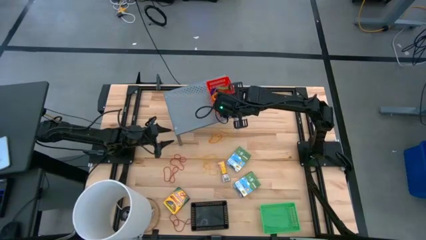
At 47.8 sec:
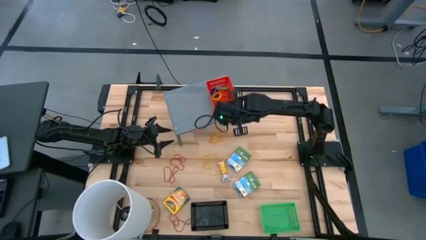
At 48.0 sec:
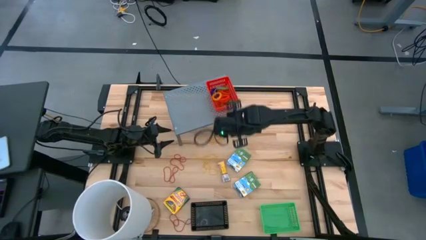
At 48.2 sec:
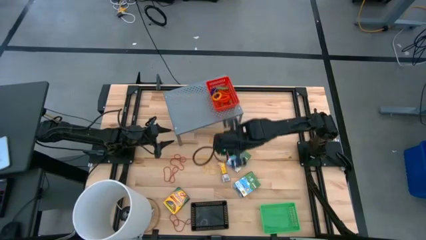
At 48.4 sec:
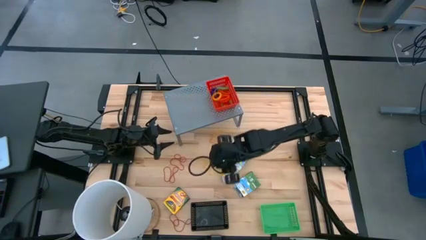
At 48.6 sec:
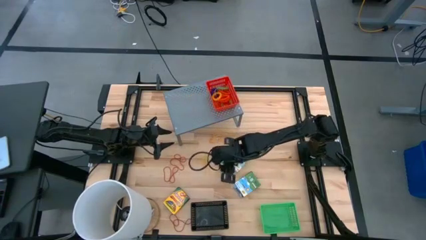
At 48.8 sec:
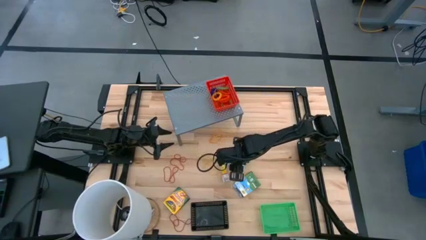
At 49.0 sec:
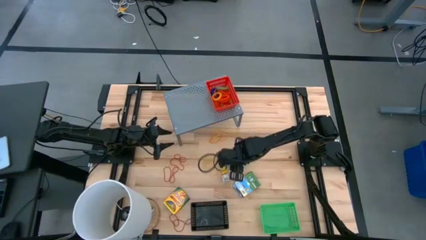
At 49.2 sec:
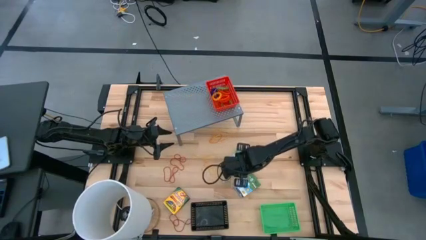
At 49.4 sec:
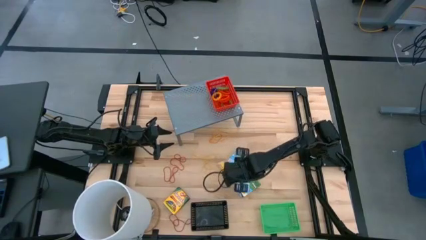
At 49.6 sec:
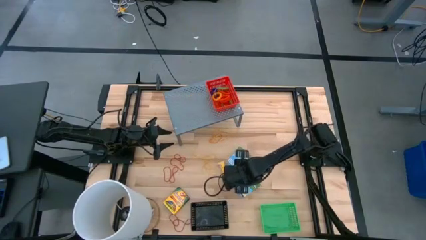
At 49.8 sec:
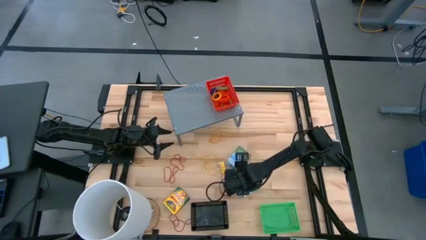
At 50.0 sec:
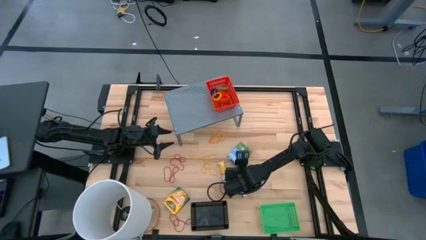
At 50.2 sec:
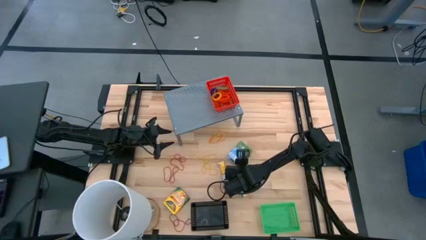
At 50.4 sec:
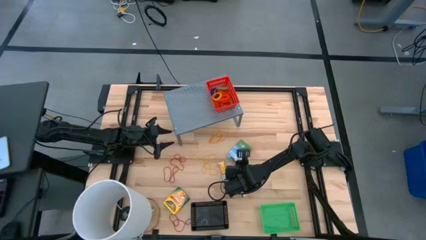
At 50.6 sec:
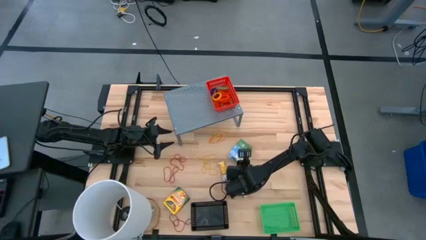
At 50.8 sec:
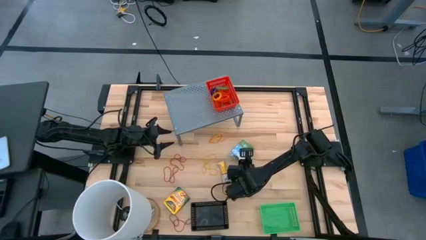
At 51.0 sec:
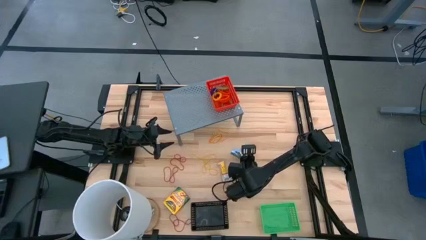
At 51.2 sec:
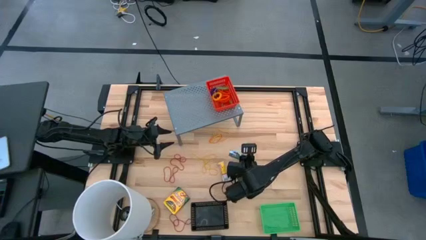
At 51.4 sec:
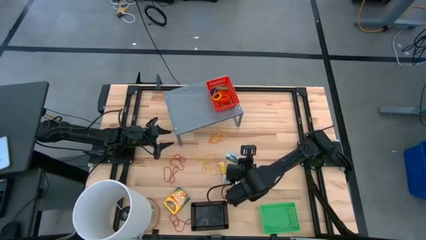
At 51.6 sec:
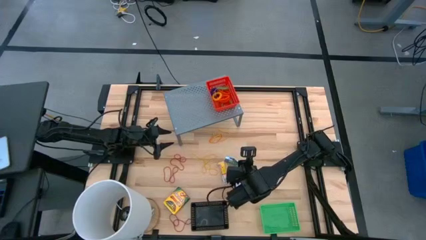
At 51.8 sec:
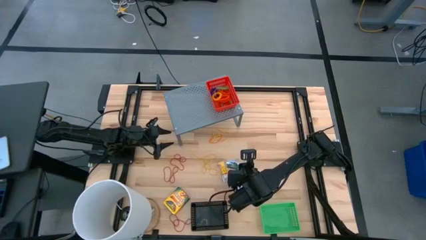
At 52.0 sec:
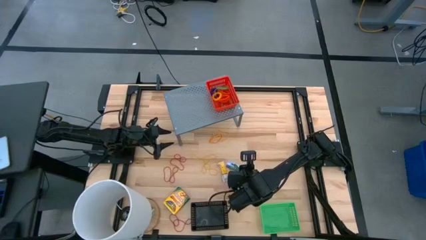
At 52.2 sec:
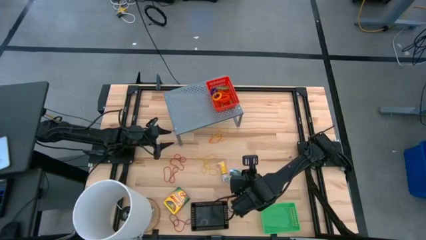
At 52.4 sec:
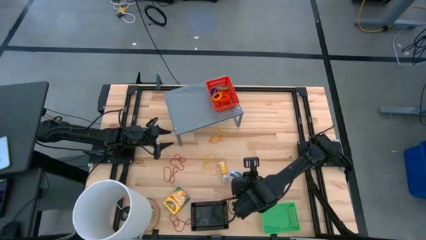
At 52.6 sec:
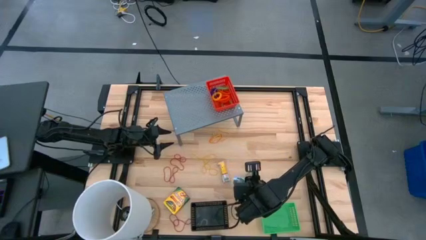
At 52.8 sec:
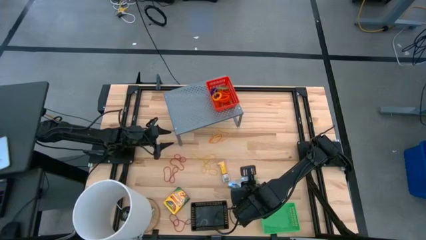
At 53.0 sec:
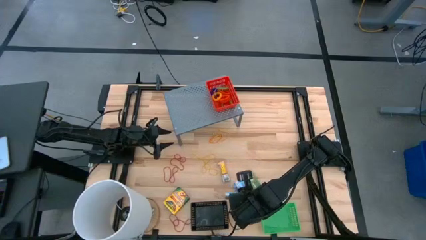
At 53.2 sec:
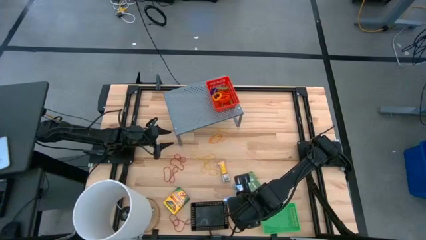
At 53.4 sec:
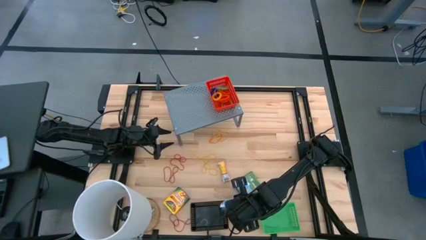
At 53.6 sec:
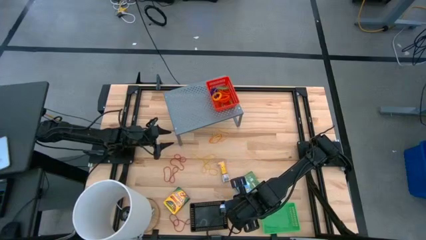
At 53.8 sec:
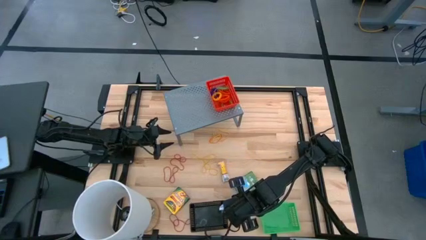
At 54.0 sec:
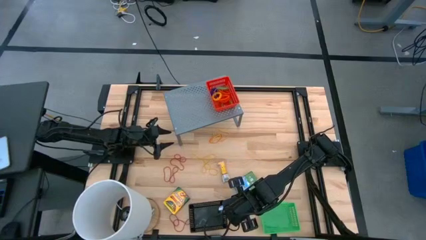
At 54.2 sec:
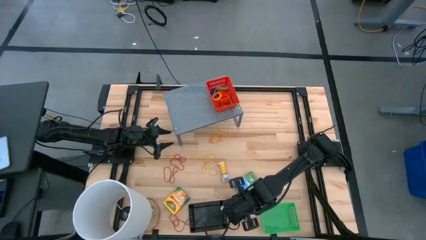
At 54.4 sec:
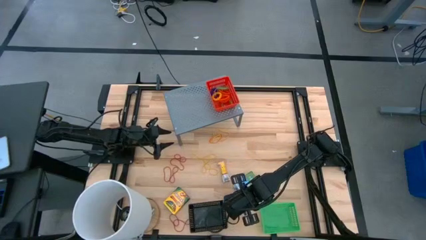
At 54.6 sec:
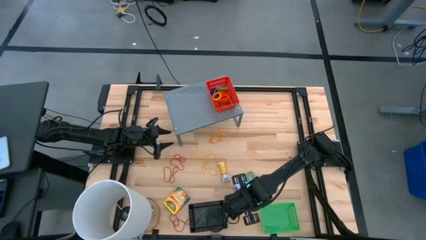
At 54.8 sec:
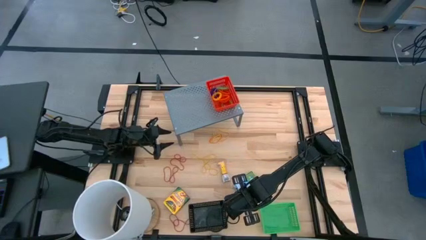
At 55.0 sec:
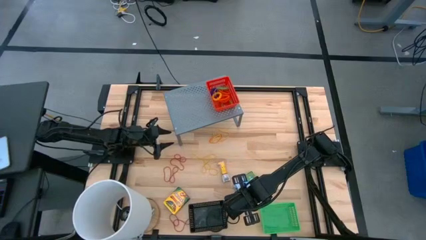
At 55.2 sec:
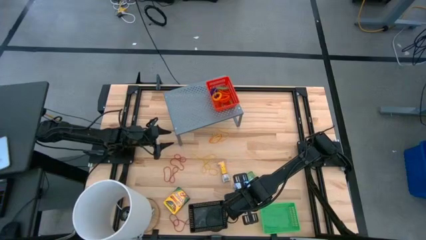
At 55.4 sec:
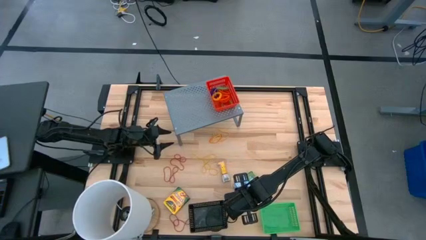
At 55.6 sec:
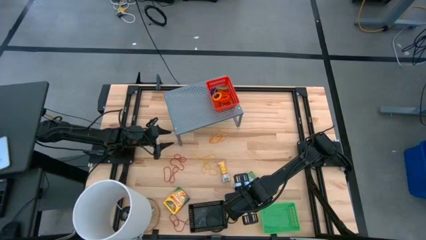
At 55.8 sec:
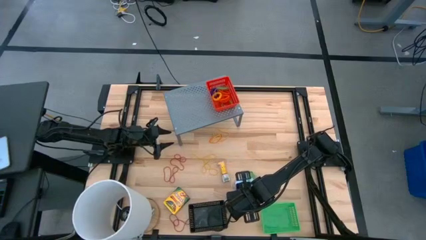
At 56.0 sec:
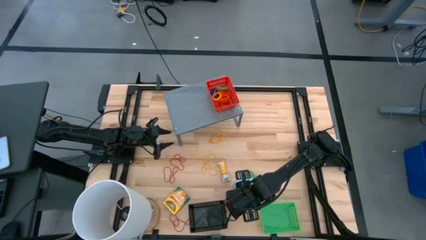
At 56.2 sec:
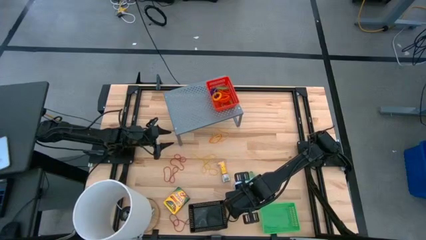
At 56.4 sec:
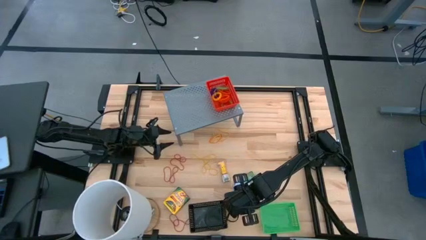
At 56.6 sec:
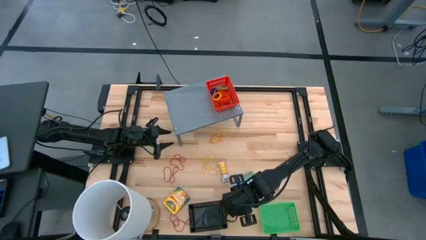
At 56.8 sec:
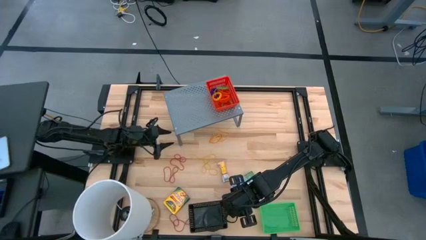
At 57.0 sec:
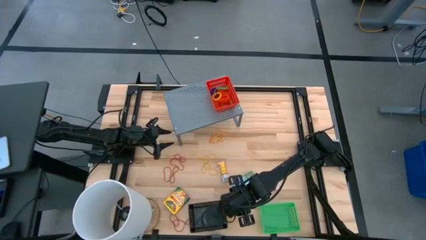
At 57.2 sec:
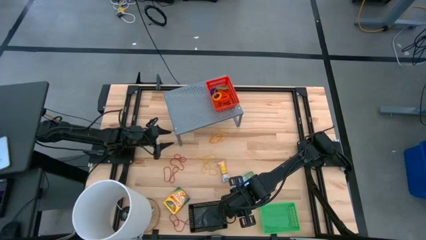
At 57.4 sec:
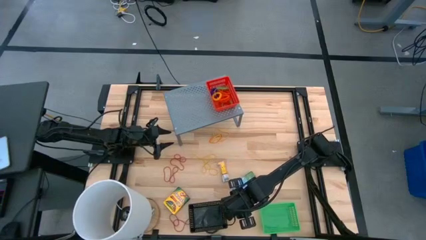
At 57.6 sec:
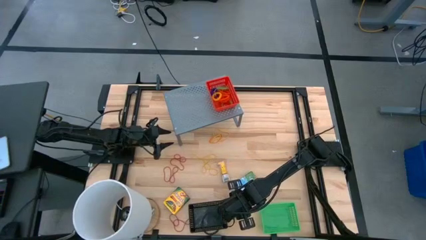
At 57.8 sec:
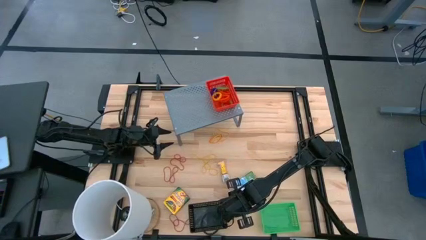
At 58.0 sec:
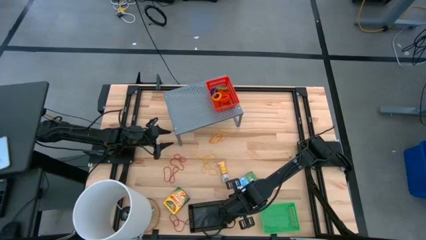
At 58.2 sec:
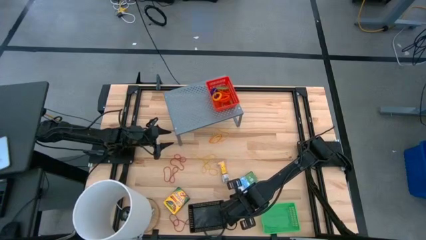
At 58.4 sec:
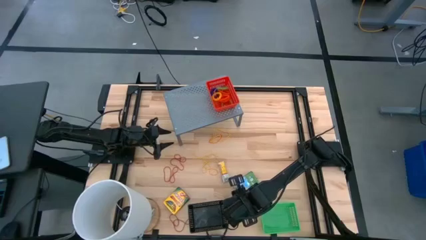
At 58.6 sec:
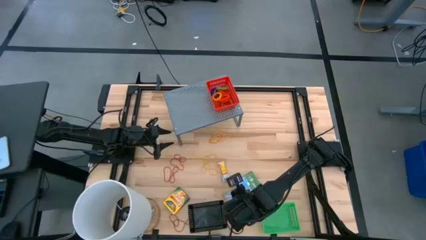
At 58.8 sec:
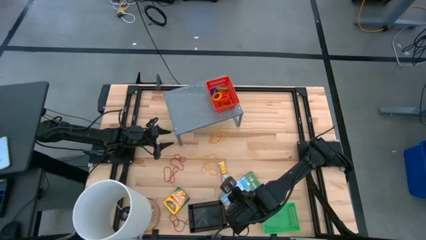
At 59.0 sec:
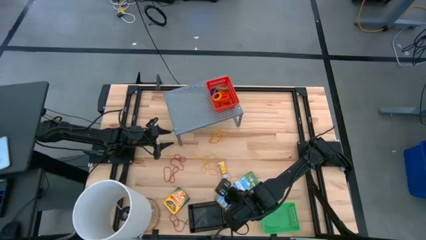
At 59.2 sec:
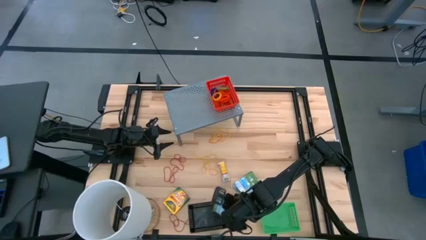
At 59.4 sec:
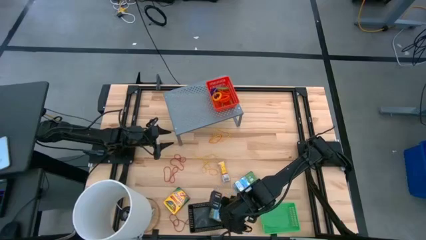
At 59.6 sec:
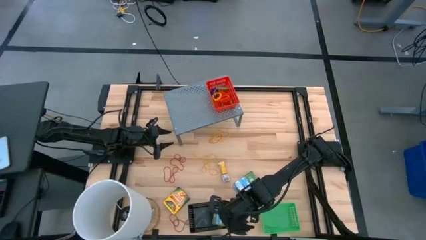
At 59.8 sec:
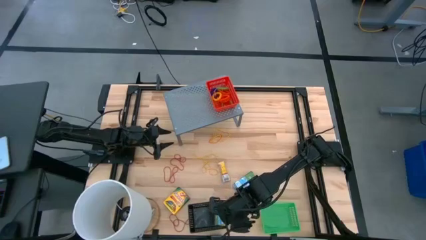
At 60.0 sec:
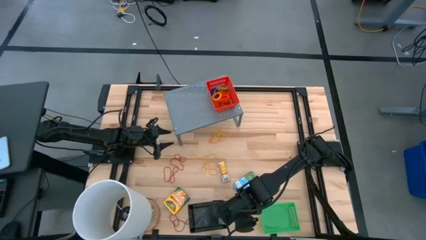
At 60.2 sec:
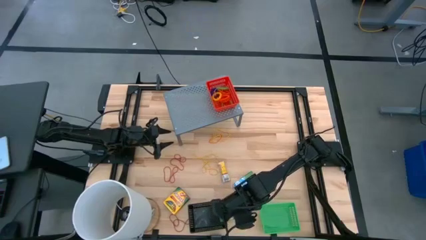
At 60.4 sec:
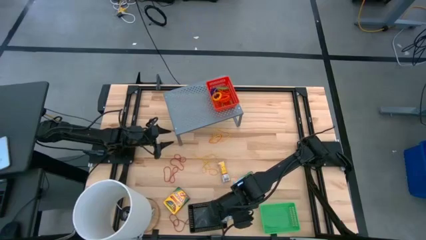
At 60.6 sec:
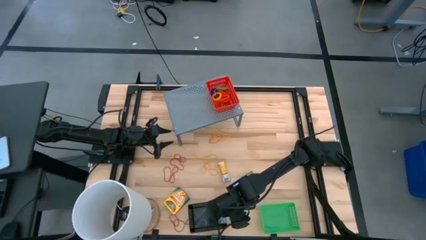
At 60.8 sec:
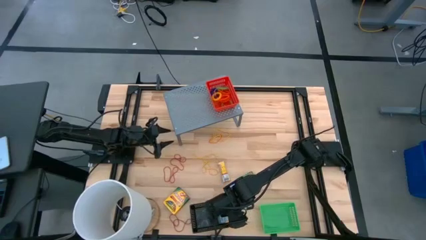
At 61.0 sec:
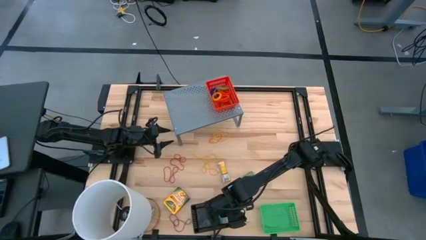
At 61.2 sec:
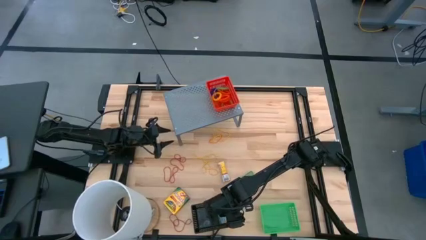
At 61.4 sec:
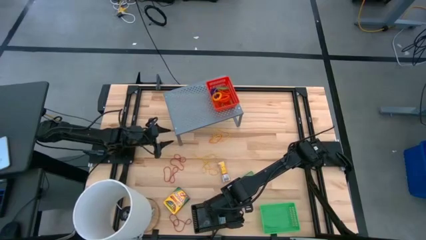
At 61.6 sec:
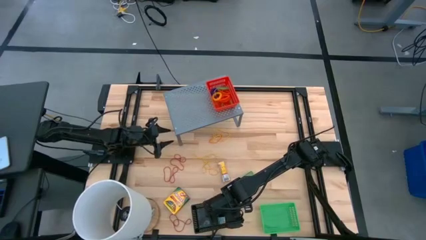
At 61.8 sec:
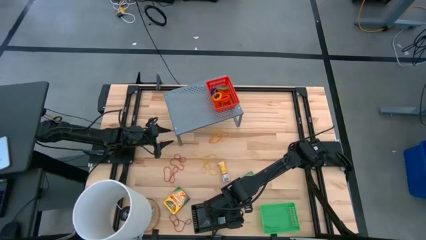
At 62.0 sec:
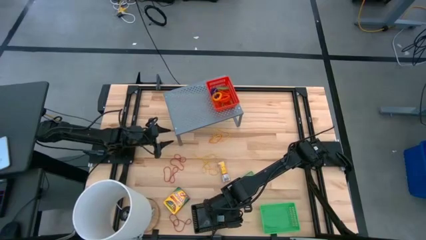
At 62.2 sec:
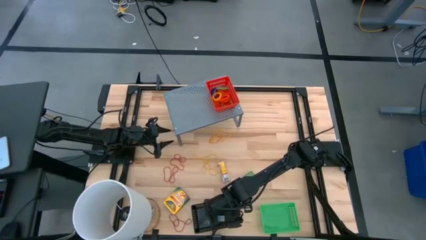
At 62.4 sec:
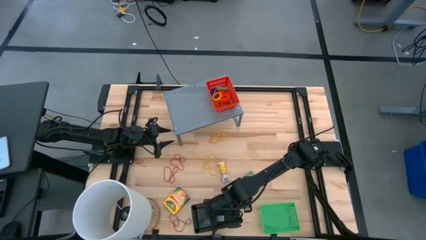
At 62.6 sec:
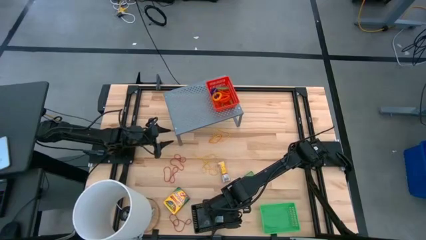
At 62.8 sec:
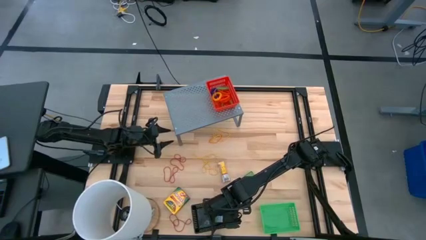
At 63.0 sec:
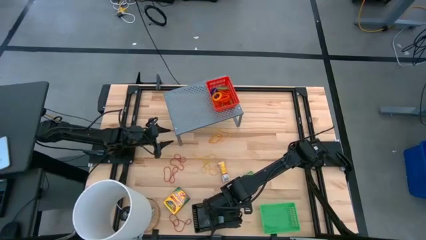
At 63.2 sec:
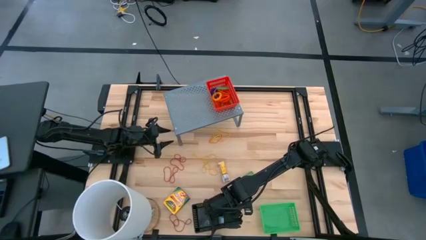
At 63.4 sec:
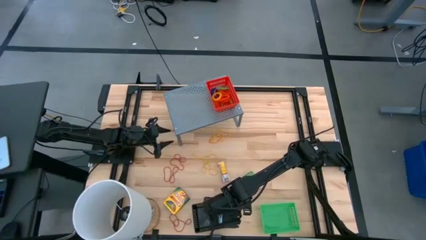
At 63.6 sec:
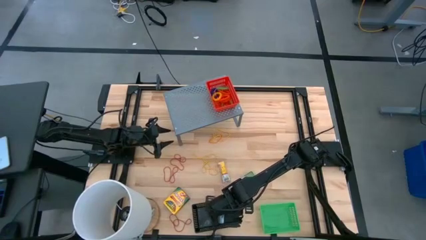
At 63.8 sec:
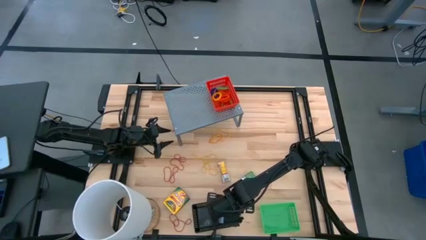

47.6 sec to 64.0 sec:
Task: Pick & Place Office Desk Supplies
Put the top yellow crayon box into the black bin

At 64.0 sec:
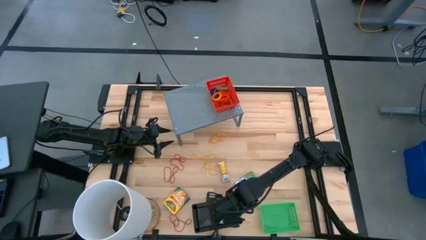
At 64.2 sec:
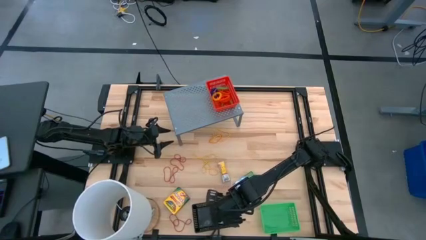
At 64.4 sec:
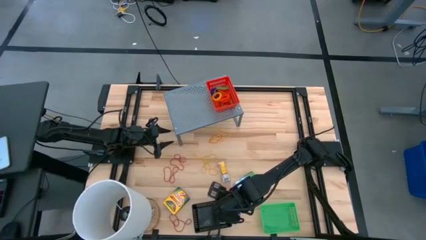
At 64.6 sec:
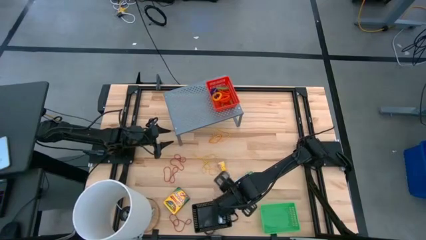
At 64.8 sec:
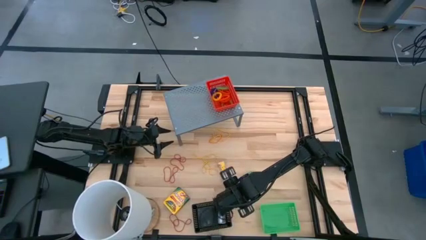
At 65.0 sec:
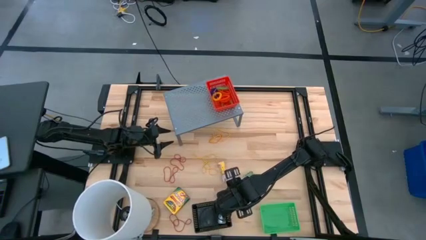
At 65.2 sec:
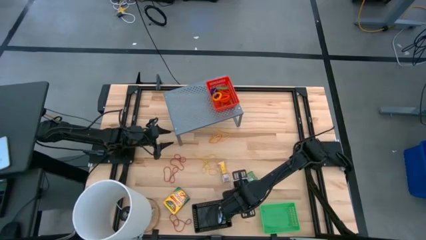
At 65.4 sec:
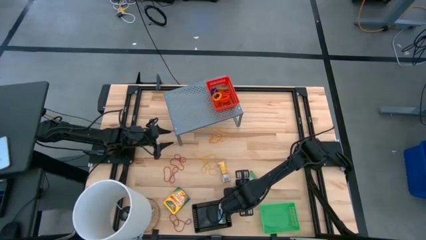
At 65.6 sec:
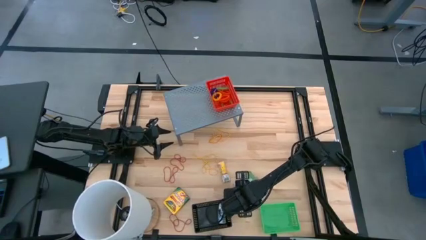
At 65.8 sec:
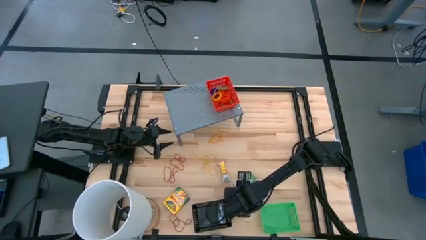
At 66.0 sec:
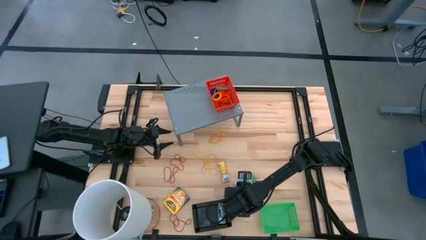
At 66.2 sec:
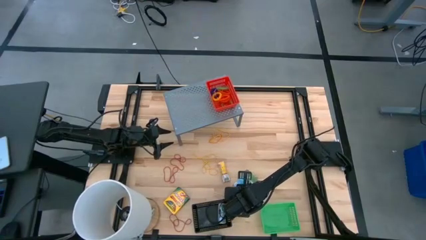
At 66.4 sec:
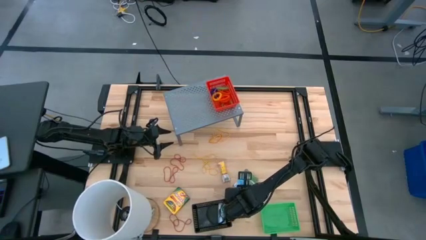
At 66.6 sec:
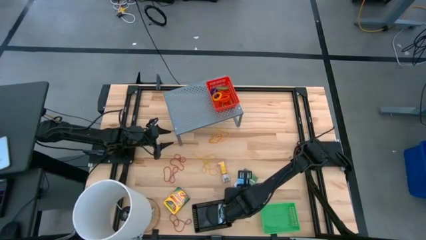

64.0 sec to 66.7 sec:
Put the bottom right yellow crayon box into the black bin
